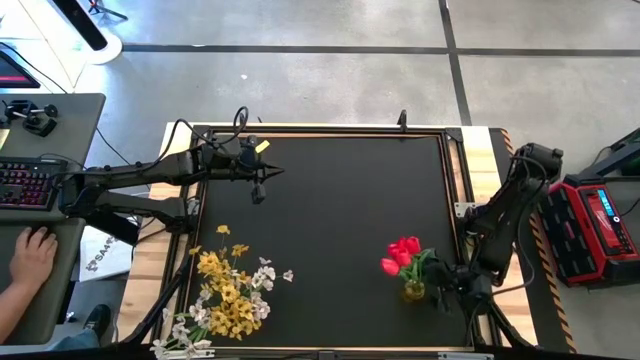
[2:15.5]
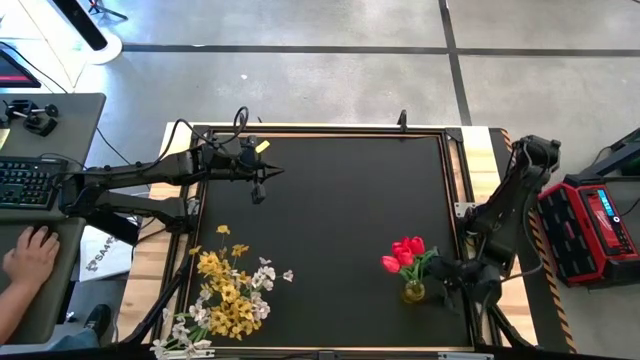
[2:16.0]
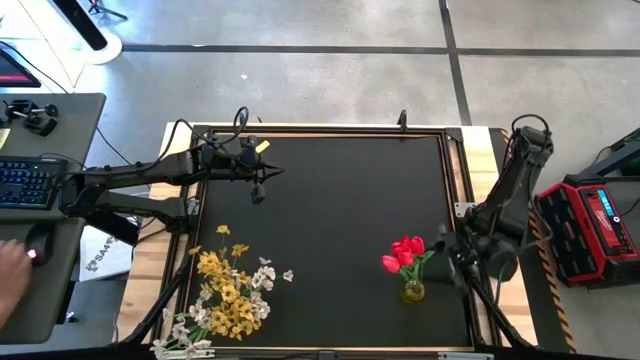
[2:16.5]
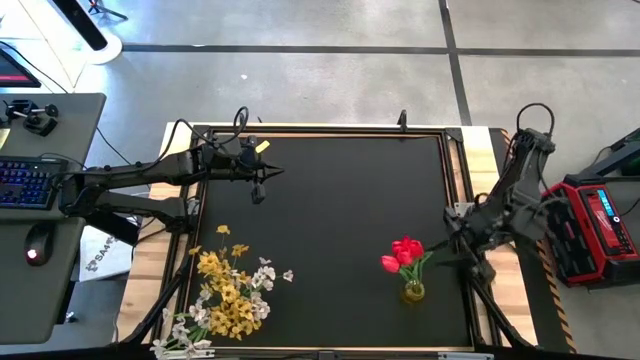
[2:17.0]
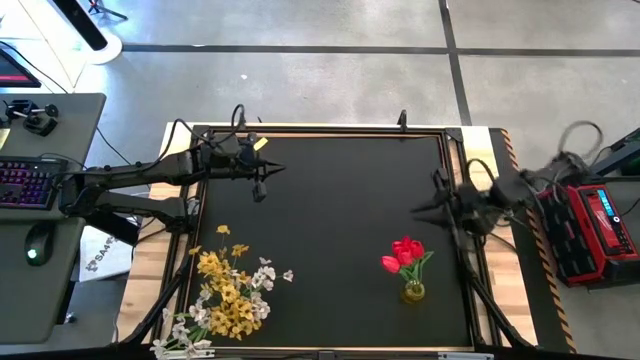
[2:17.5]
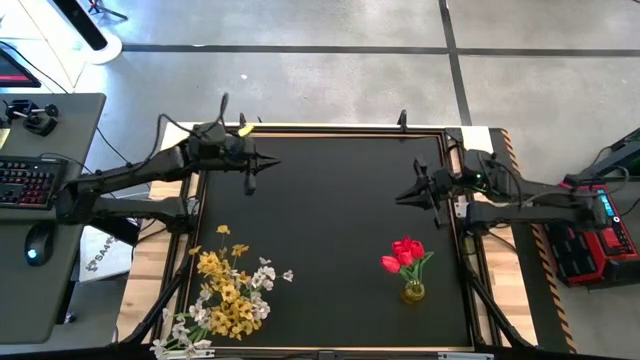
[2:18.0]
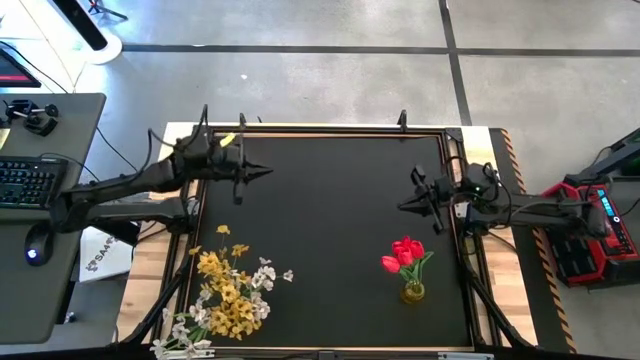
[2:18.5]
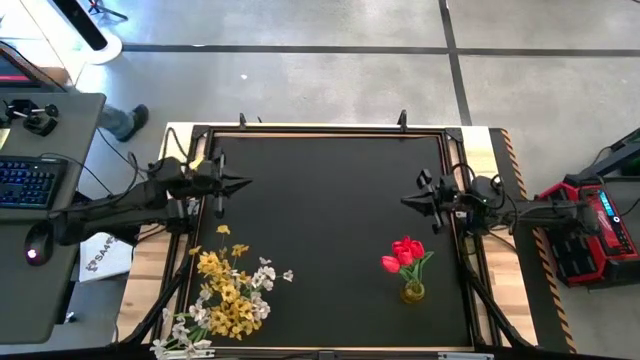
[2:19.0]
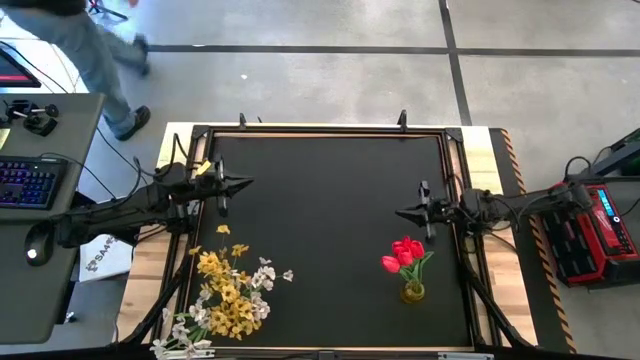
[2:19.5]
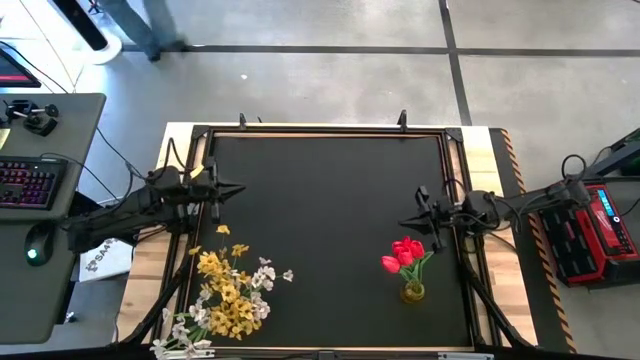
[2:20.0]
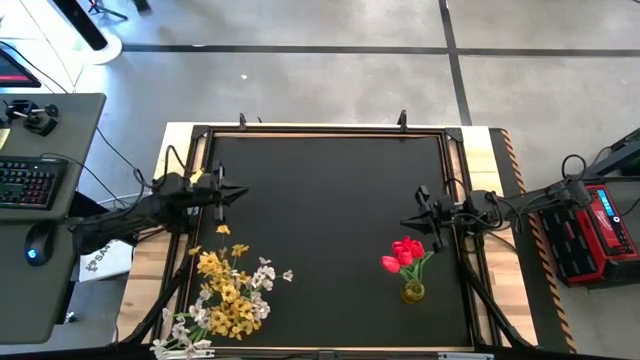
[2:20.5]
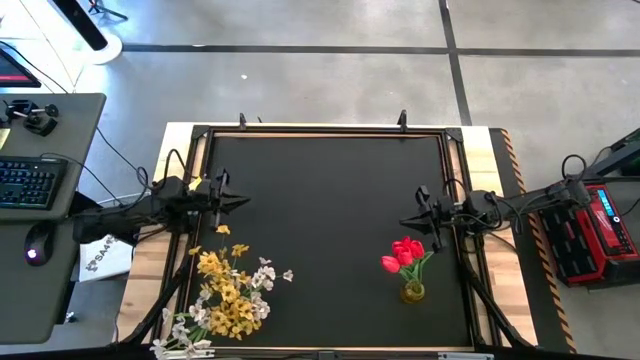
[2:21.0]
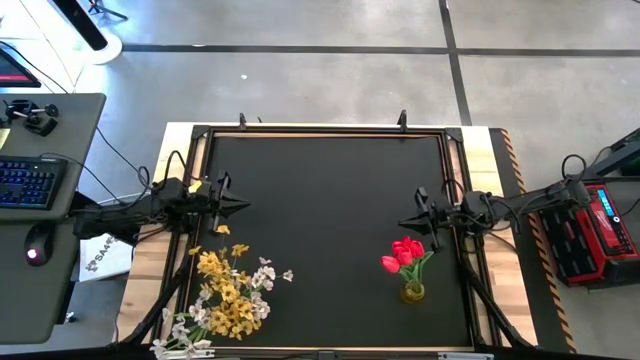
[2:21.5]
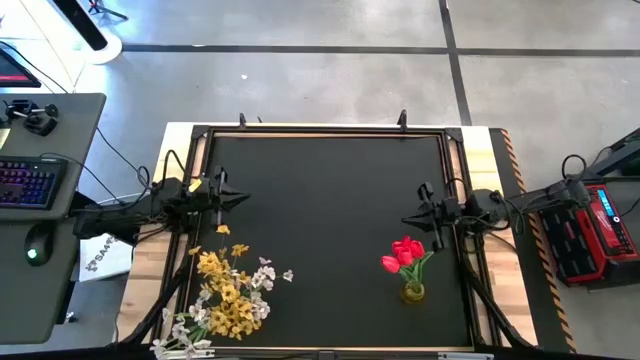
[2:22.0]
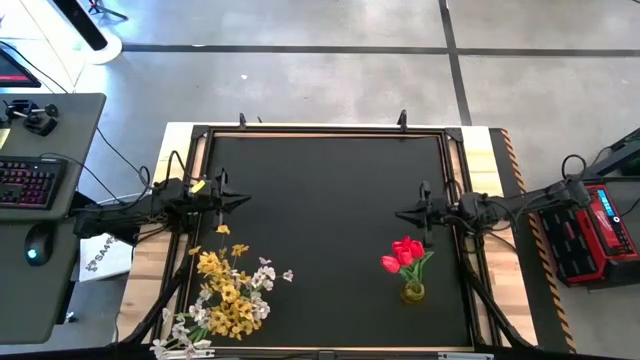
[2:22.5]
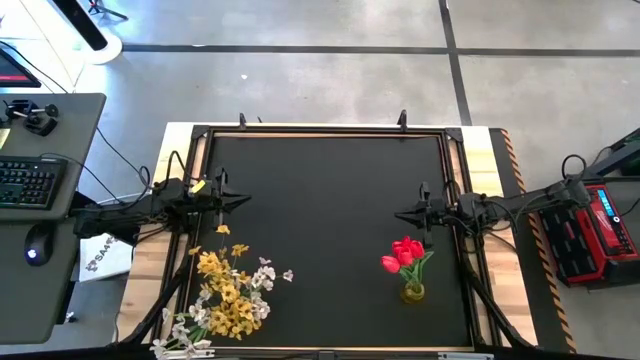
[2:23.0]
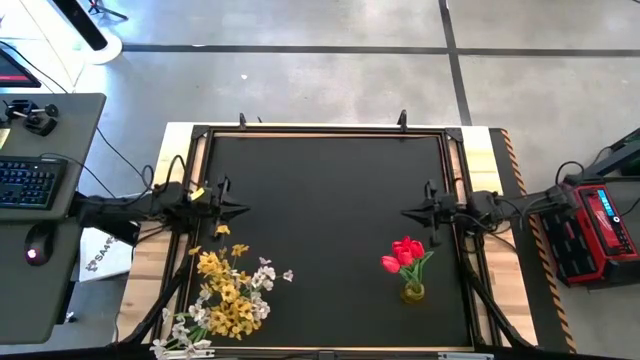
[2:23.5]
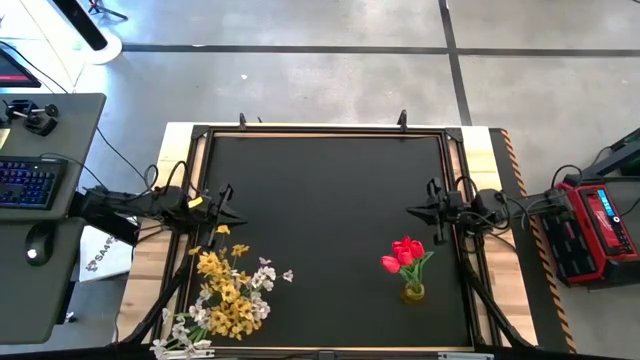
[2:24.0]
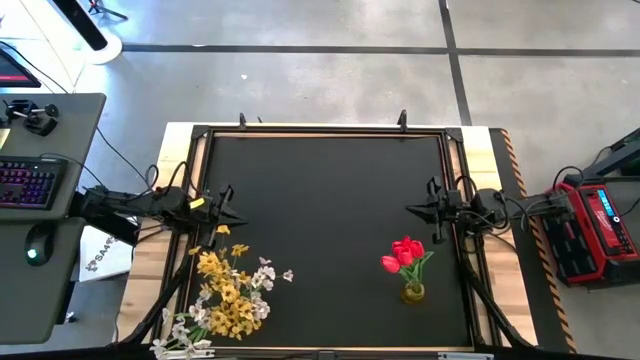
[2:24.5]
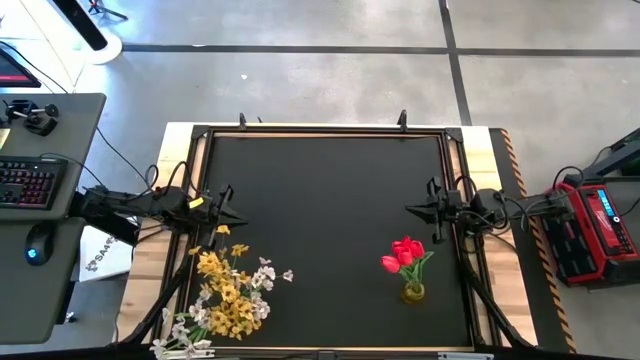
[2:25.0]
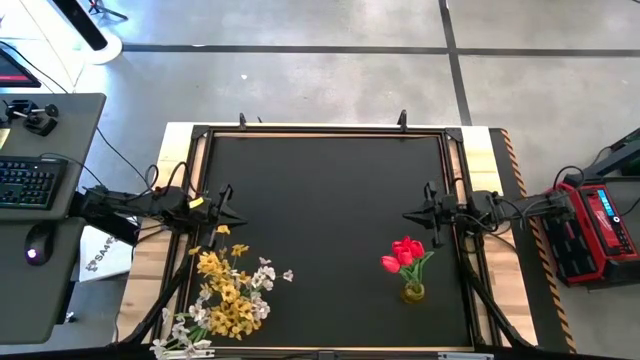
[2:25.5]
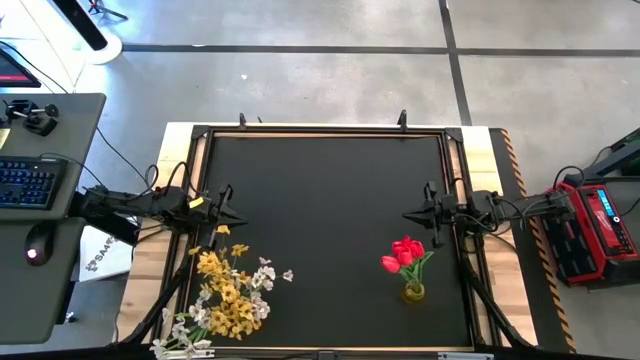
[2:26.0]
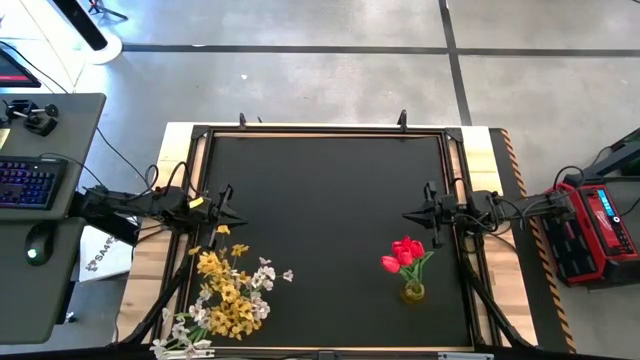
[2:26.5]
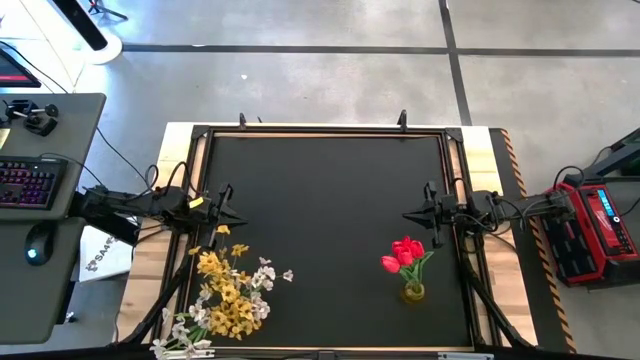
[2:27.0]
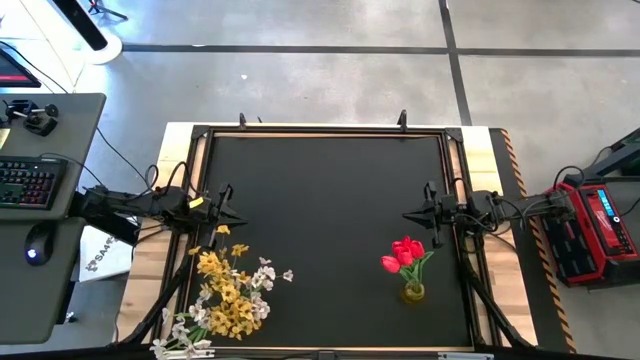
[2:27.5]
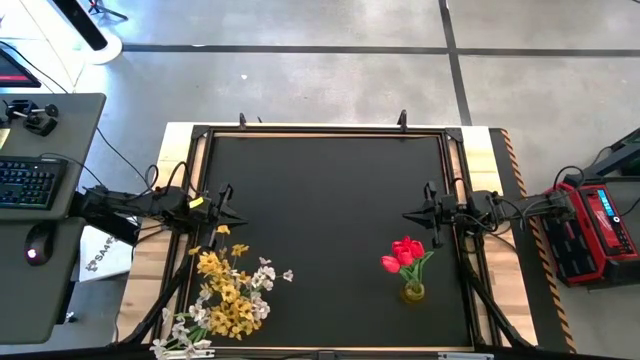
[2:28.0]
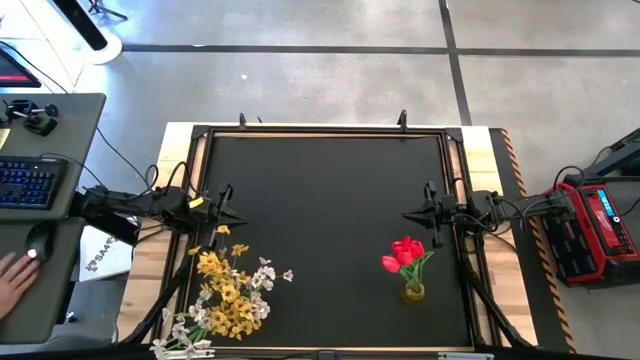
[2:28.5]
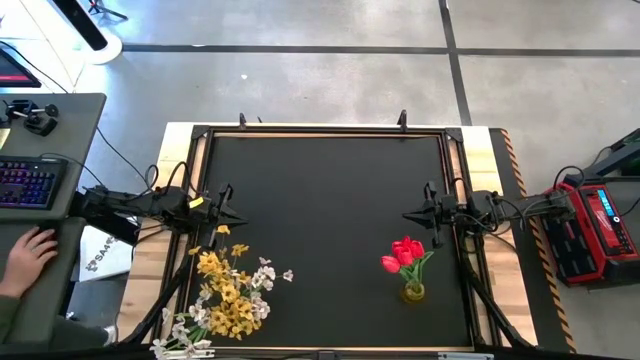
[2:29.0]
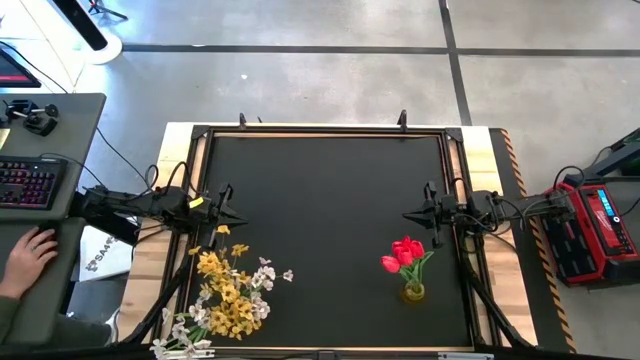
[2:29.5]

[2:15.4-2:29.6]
Task: Sort flowers into vase by color
Return to Home Position

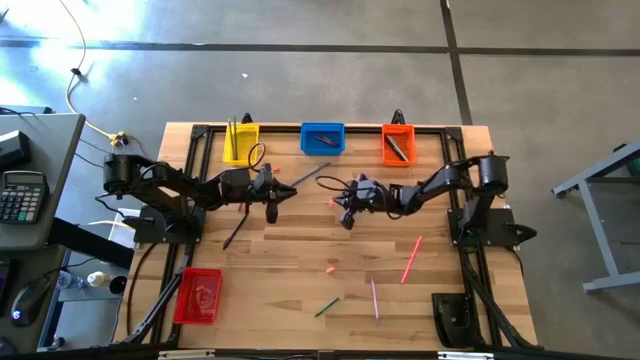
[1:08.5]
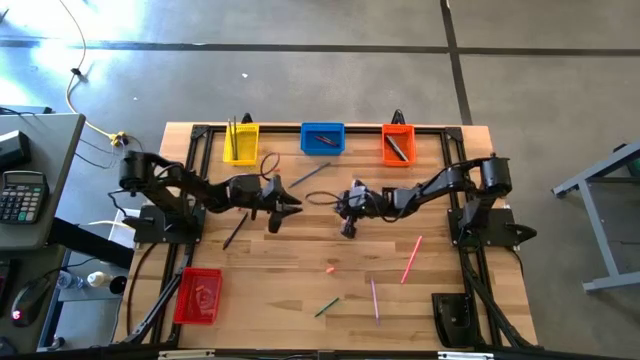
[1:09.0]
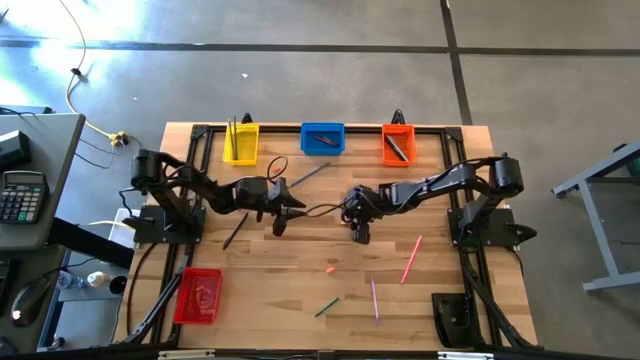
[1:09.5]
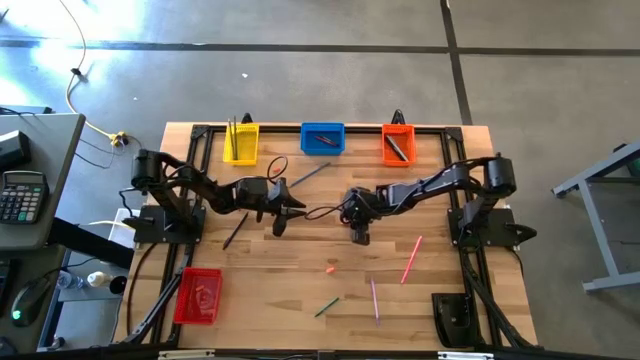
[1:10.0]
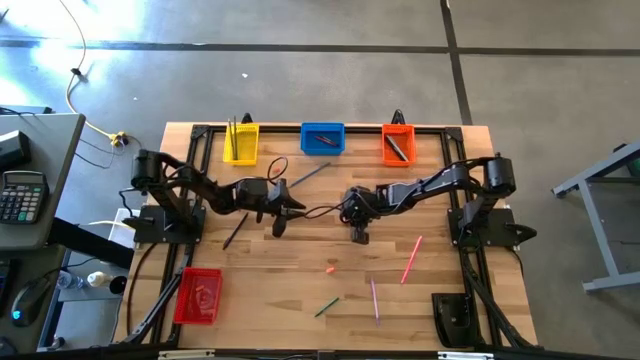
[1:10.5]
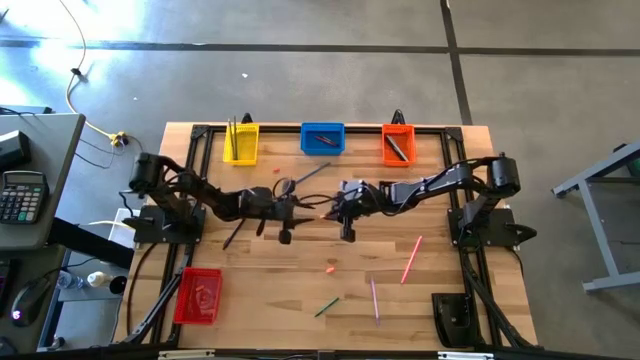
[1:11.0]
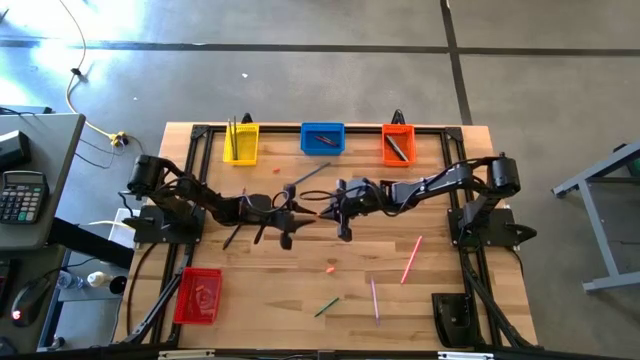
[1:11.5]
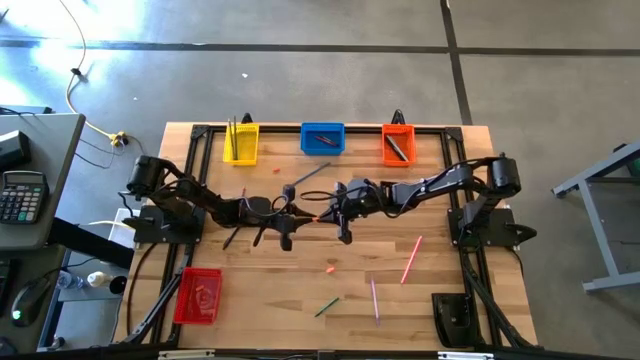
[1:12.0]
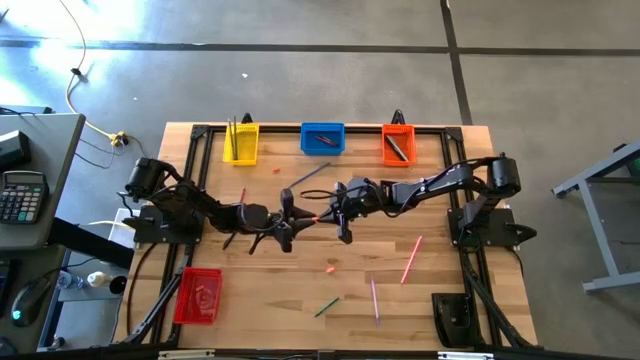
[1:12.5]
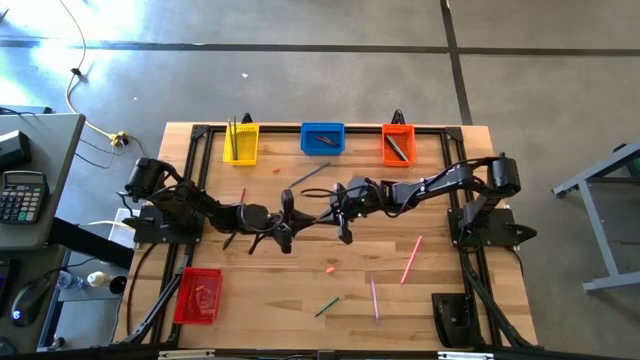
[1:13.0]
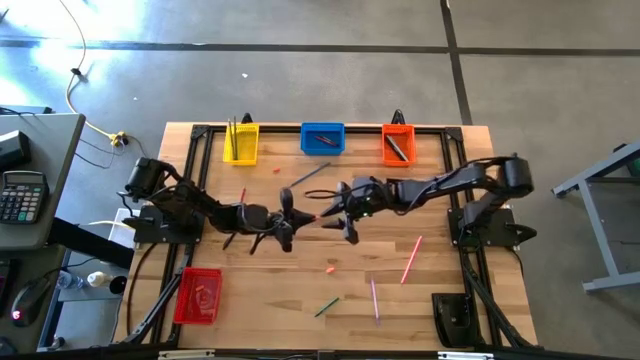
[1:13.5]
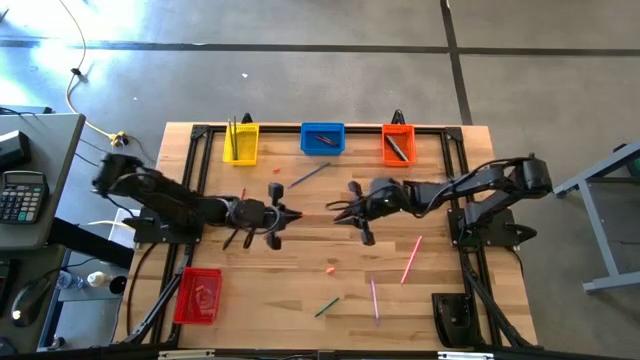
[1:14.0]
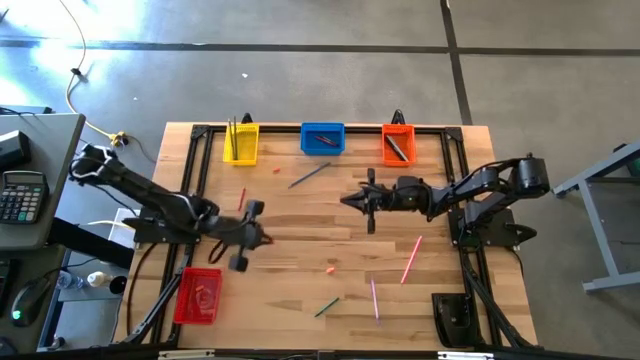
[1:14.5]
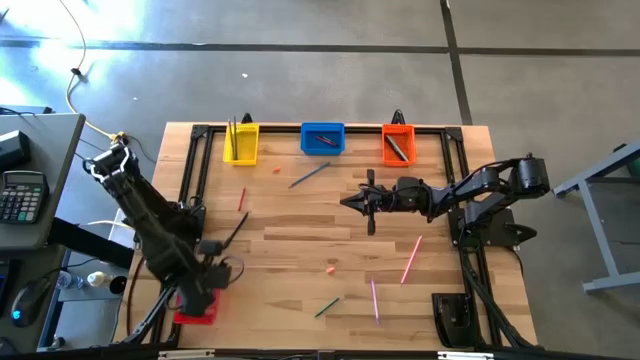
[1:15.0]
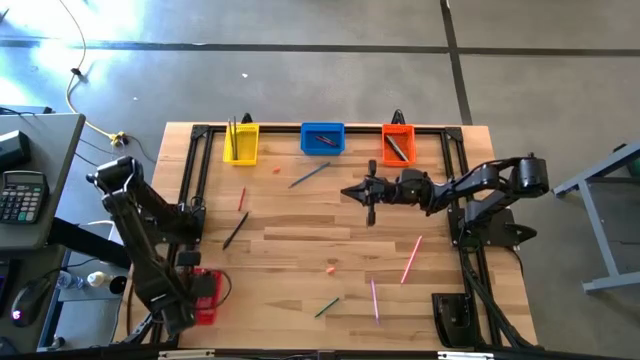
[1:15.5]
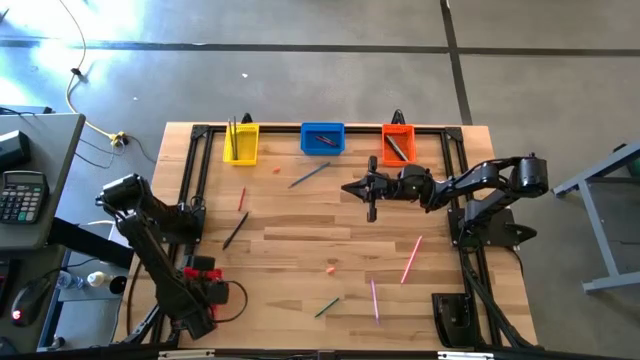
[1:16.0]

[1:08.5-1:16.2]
Task: Sort crayons/erasers/pens/pencils in bins
Put the orange eraser into the red bin

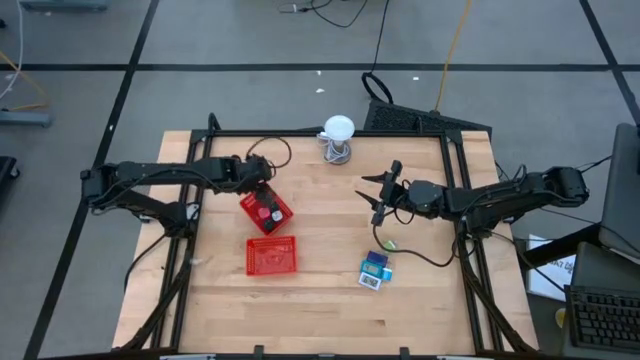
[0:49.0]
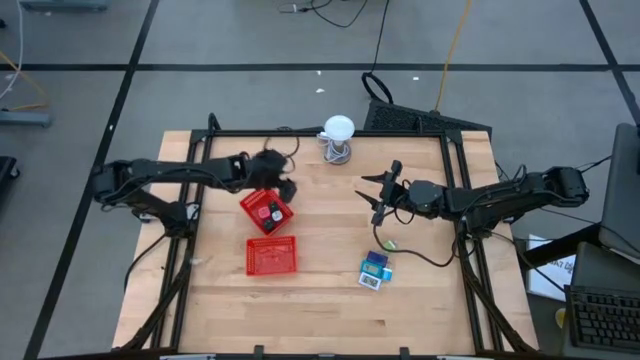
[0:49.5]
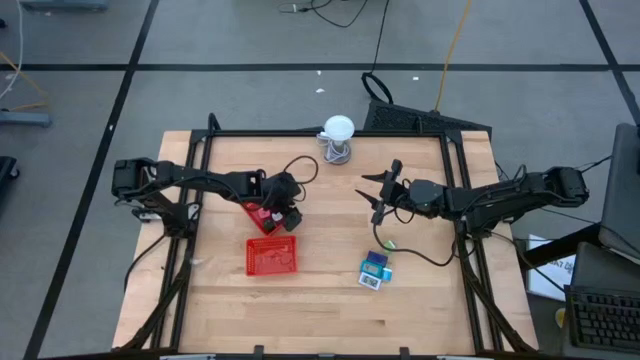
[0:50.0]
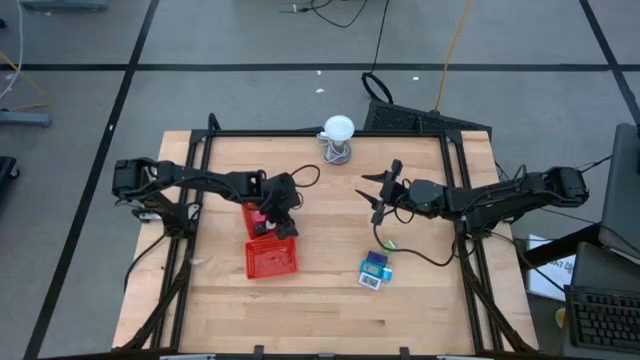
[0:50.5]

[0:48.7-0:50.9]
Task: Pick & Place Office items
Adjust the top red basket
